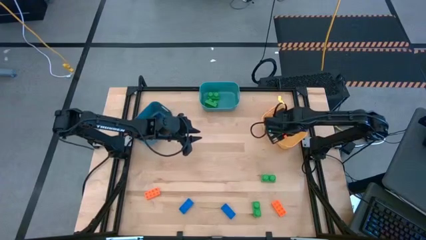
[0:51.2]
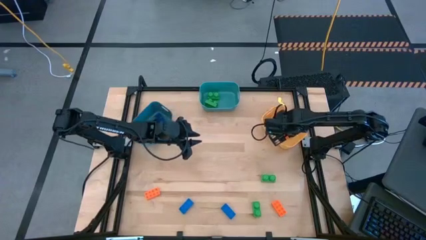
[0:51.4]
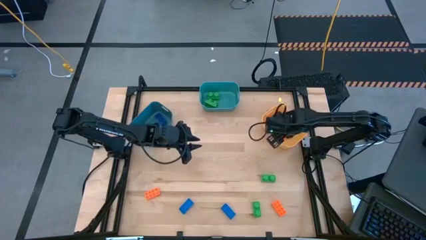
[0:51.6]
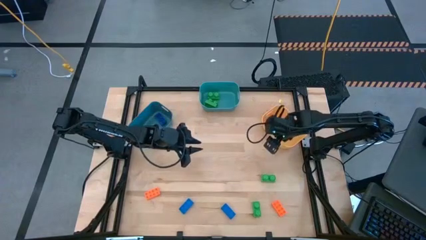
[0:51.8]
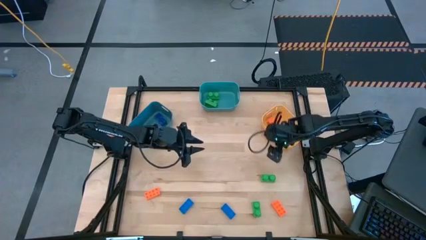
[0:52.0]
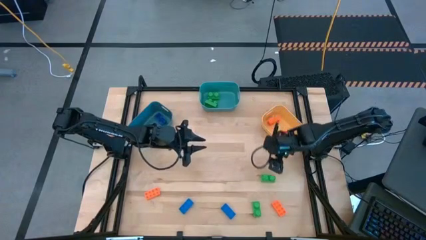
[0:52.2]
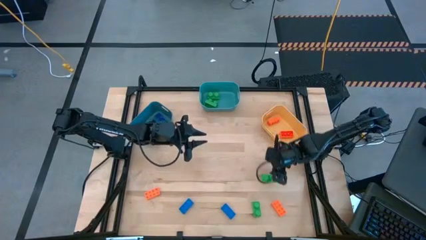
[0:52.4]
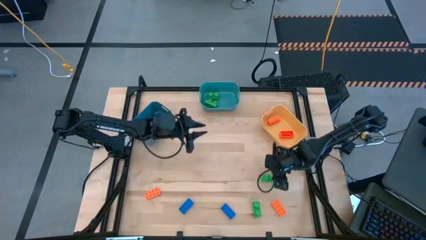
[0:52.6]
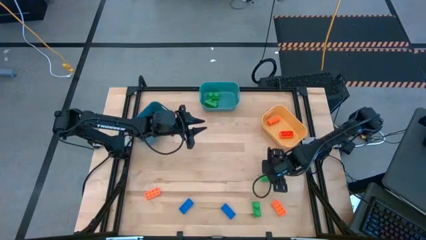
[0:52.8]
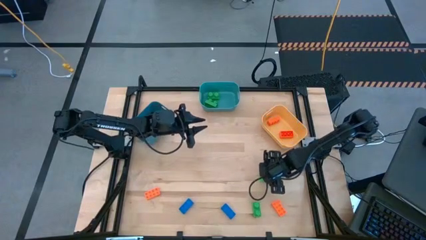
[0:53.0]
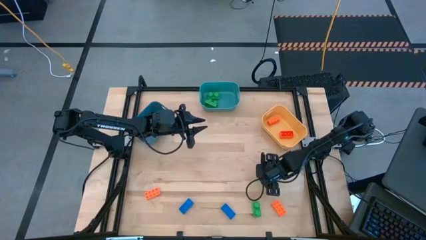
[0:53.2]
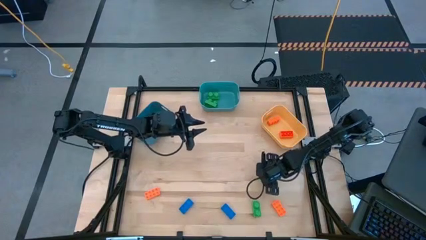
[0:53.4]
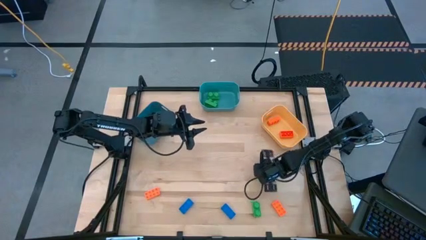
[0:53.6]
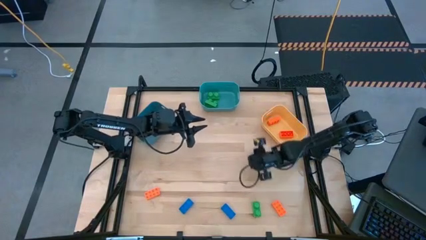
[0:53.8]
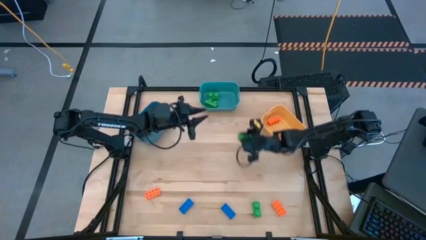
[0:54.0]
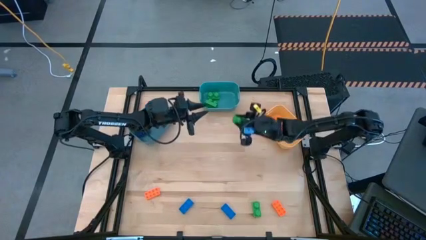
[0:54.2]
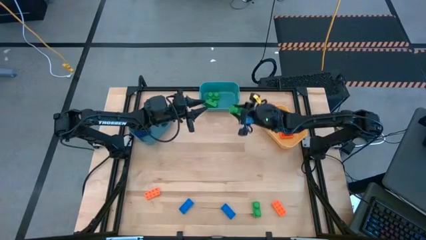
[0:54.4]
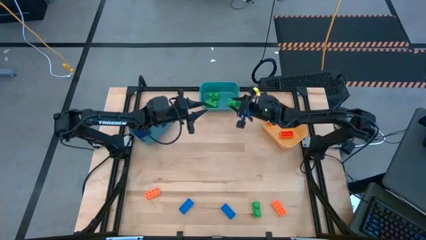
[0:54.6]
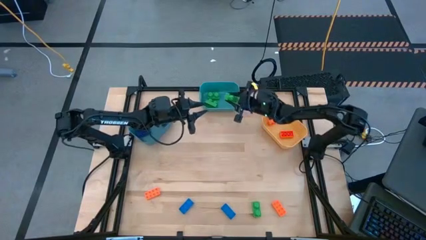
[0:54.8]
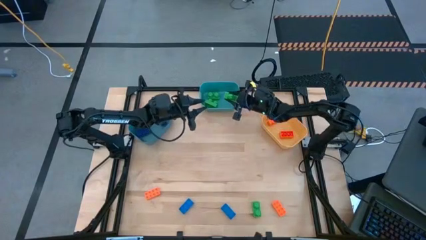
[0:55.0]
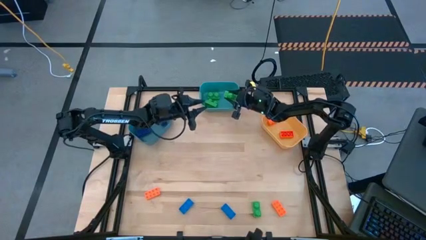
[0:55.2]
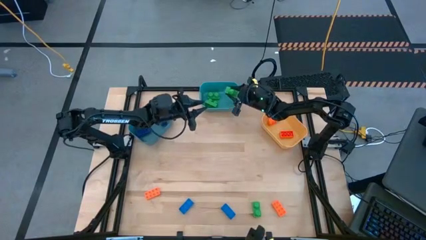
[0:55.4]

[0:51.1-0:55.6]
Task: Sort & place blocks by color
Put the green game piece into the green bin

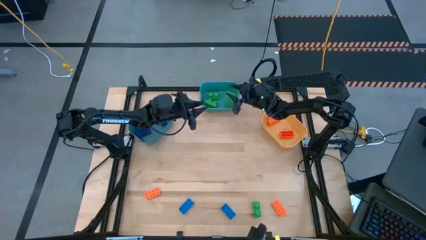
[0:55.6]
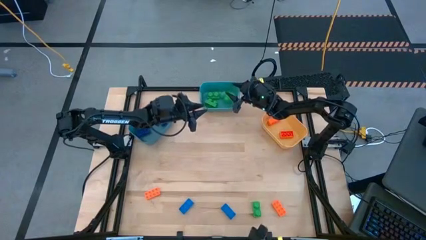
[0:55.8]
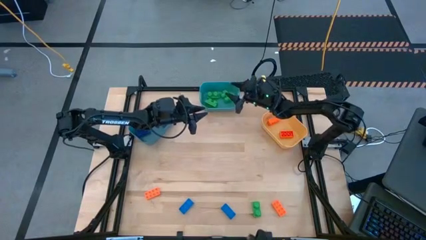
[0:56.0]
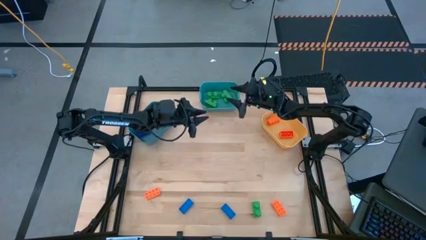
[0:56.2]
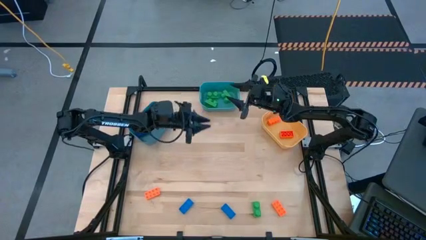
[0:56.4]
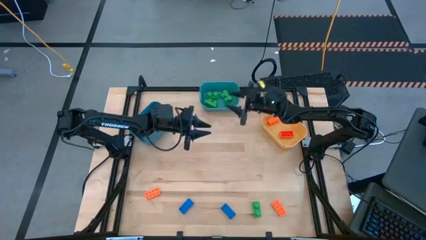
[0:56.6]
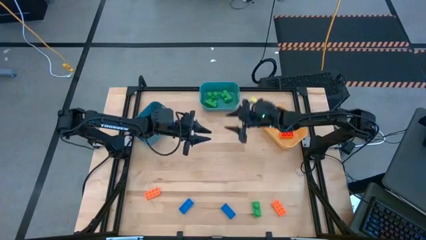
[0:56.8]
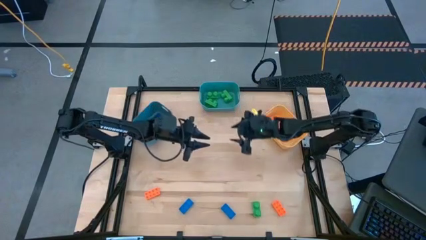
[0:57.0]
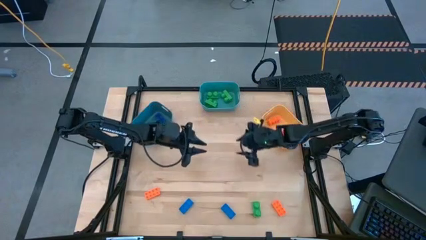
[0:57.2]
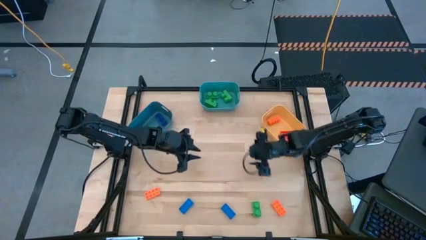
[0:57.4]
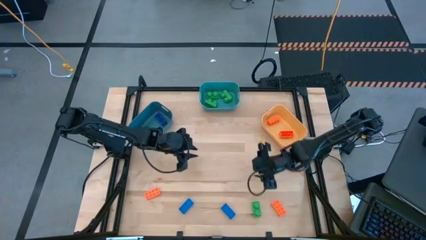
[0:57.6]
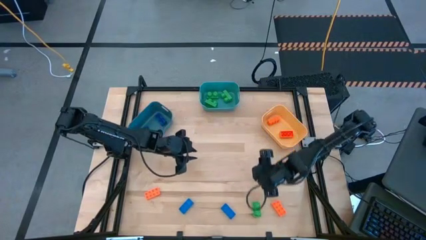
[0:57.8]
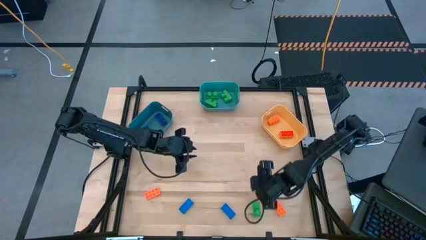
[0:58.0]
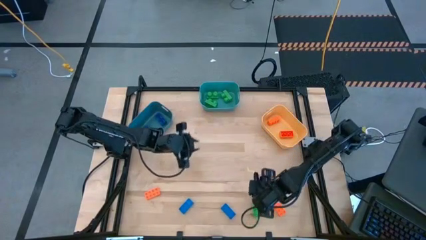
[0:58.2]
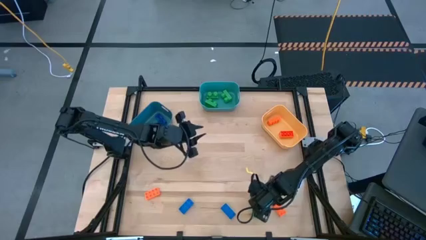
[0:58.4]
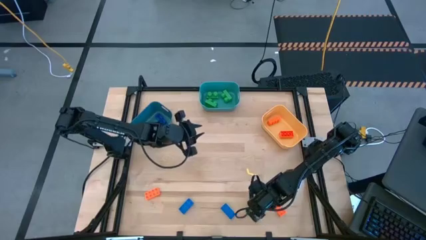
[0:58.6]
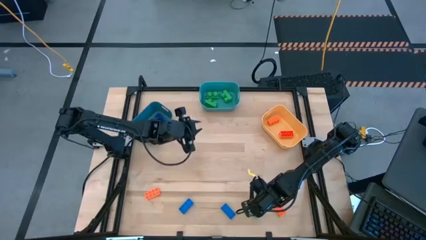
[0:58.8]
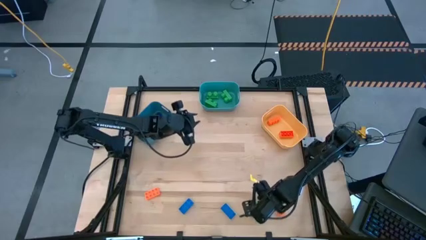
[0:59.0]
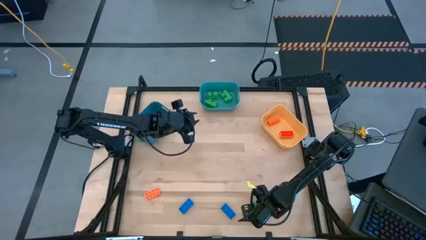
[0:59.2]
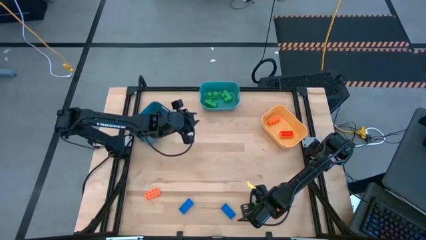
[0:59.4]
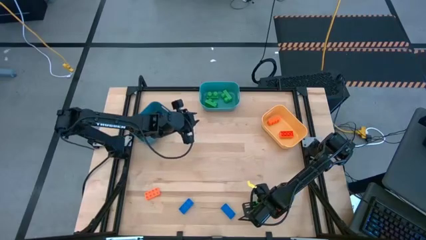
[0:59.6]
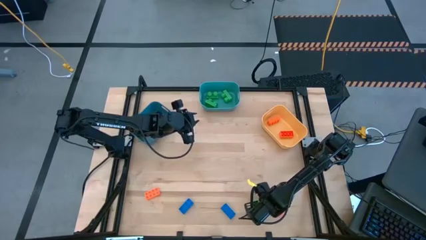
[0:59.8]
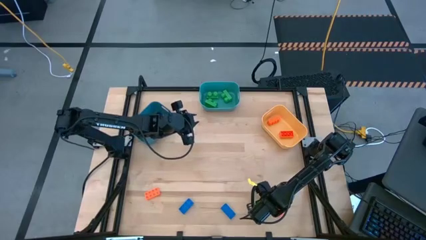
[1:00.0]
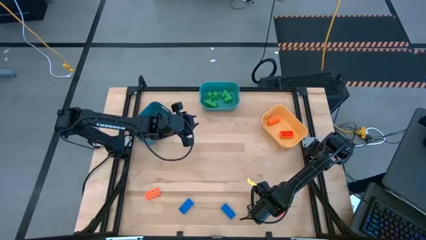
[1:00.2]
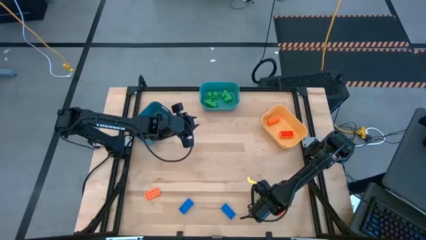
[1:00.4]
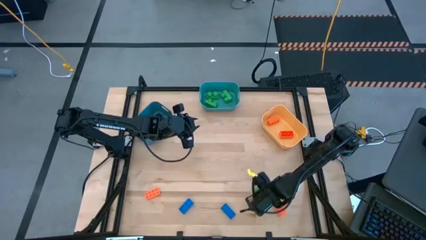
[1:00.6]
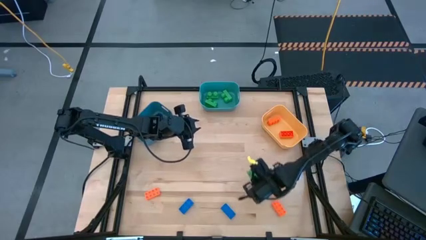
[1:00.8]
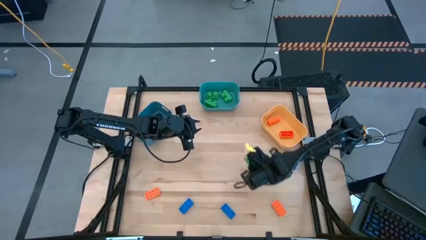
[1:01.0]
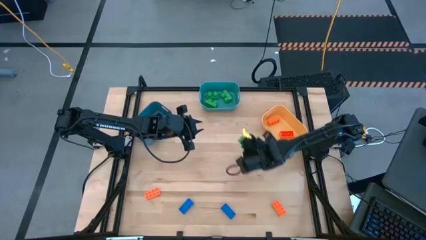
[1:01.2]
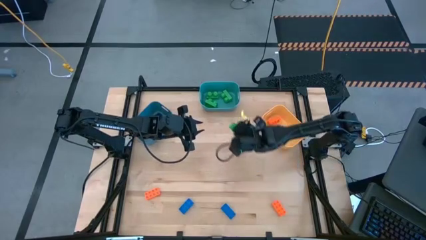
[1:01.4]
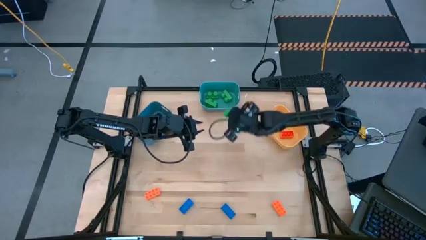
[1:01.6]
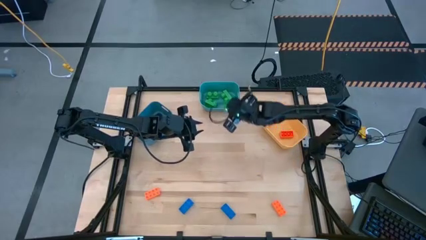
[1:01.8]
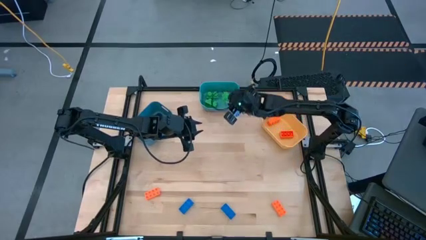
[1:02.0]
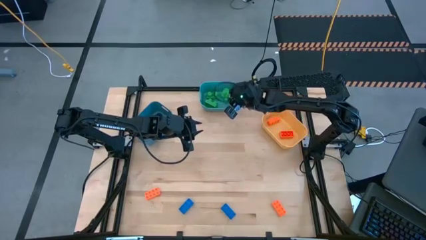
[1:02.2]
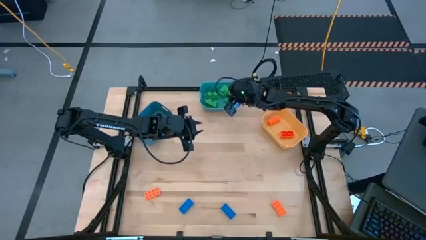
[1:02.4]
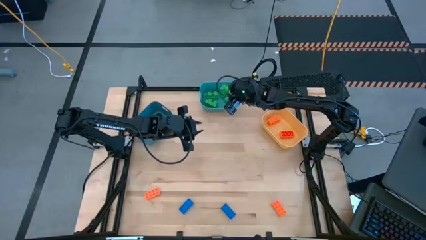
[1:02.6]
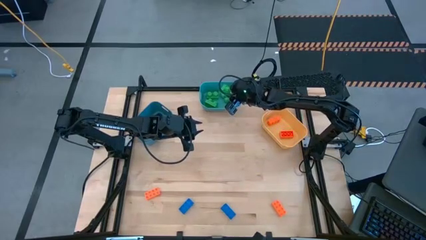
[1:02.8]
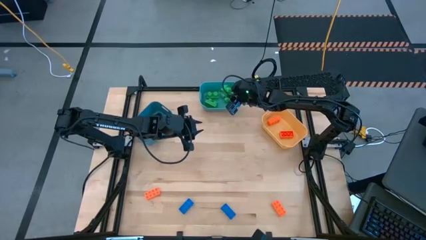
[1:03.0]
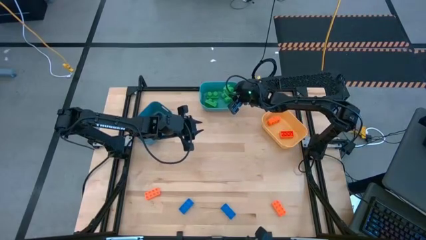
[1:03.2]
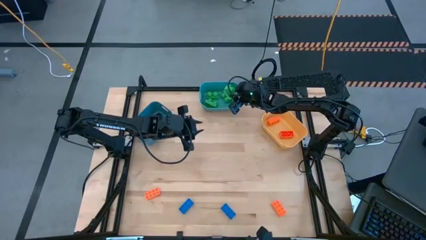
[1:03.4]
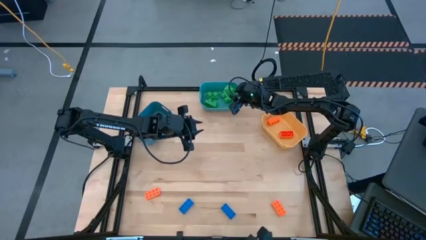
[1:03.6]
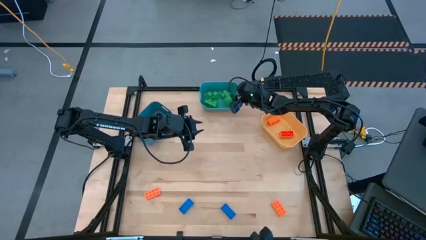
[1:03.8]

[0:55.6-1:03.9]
Put the green game piece into the green bin

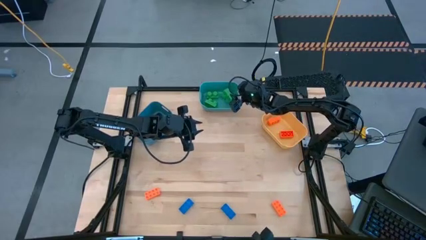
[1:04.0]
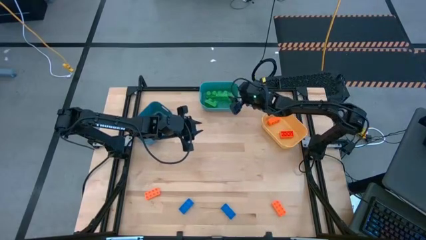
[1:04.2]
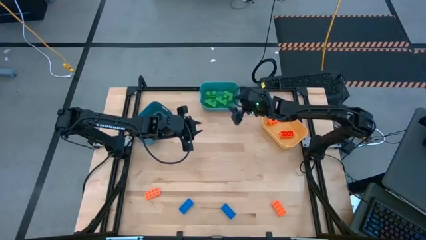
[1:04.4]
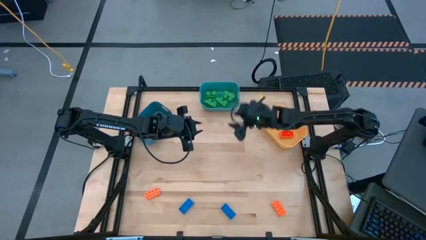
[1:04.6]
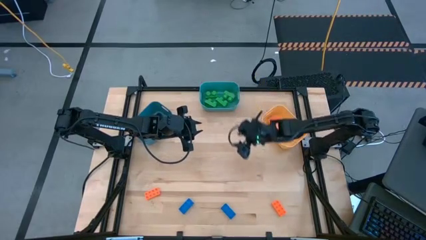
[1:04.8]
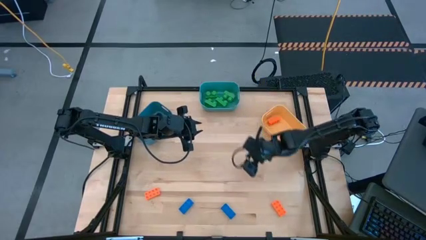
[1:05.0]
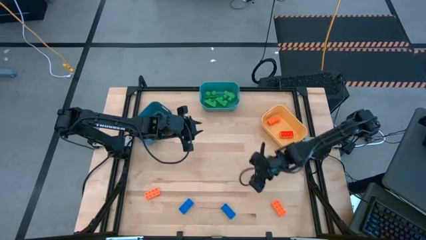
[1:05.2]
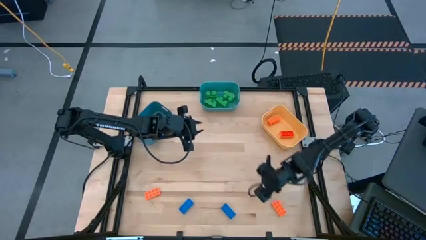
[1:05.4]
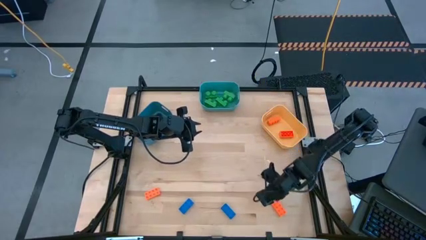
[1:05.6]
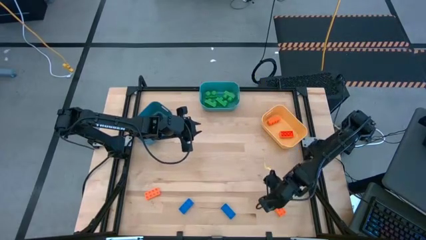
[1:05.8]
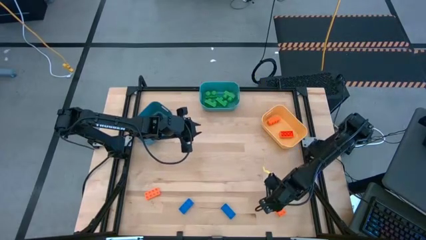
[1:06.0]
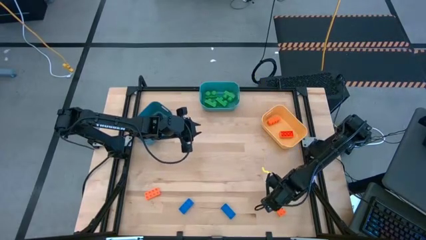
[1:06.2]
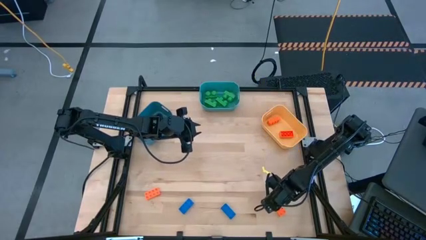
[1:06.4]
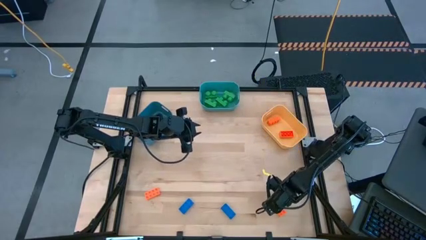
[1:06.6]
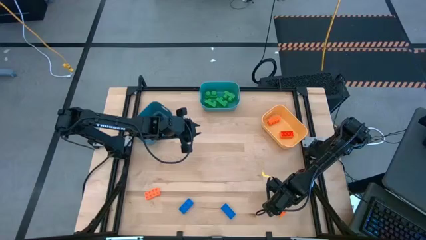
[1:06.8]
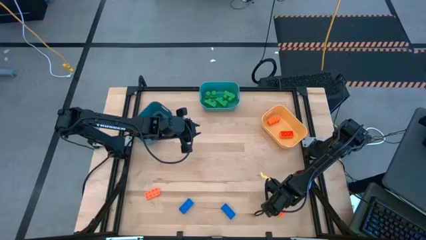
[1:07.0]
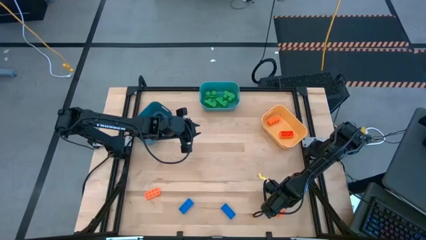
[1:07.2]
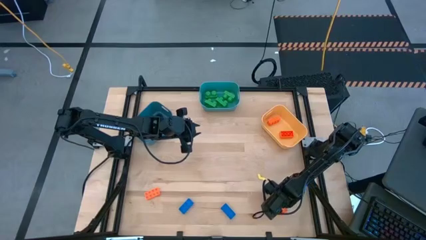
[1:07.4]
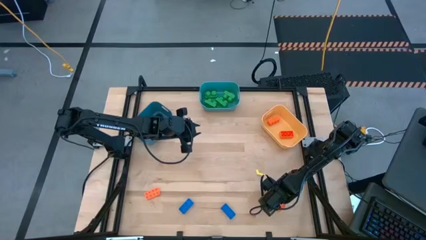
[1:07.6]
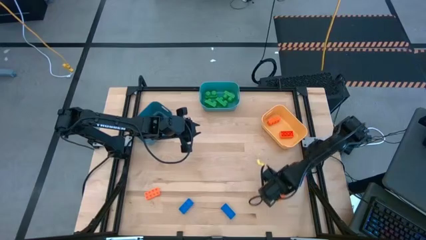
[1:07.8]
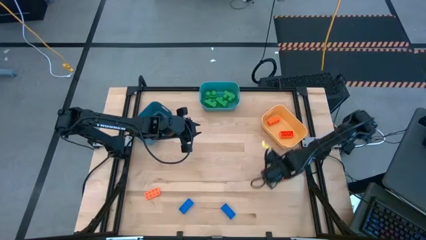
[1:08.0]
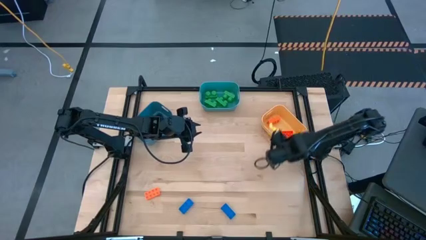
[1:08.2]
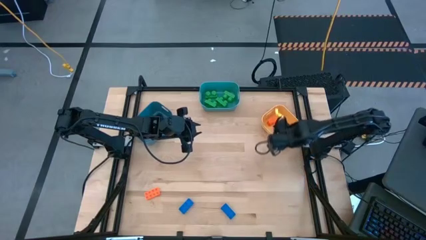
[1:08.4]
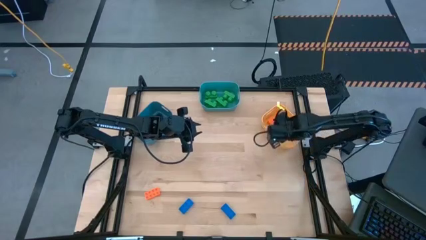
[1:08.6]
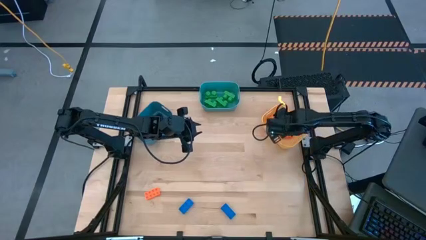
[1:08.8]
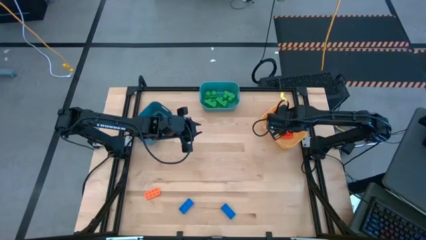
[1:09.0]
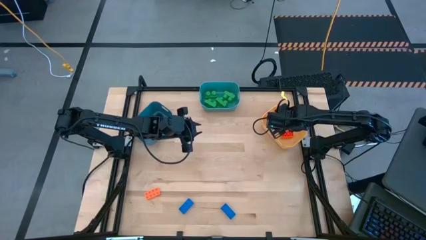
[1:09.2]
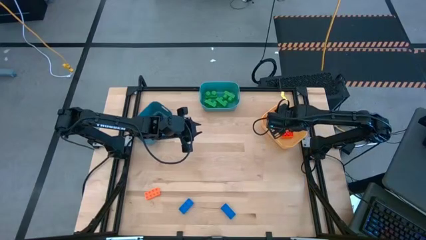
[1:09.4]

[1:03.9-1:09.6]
Put the orange game piece into the yellow bin
